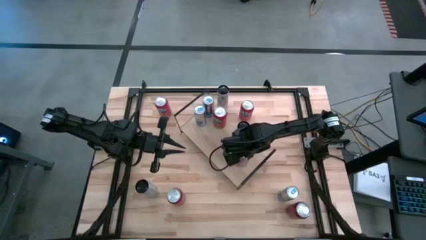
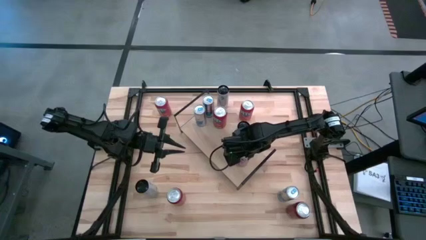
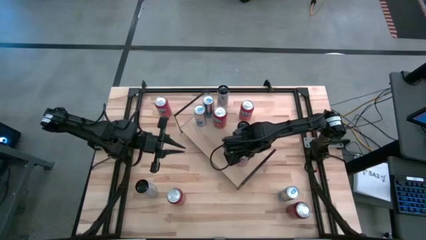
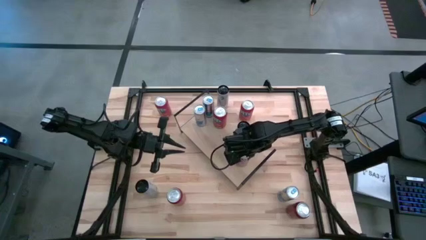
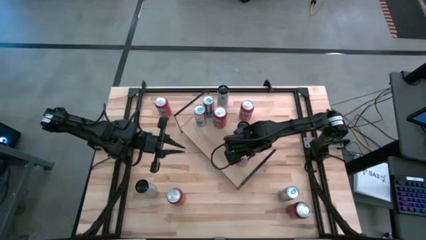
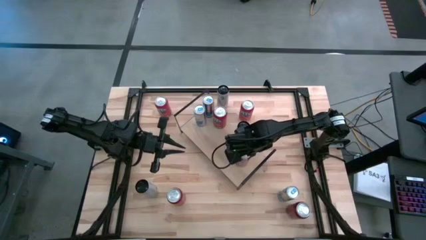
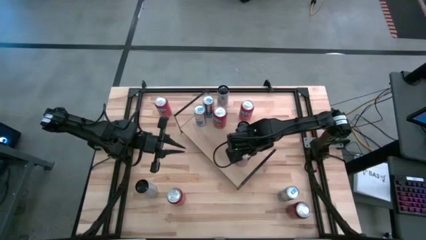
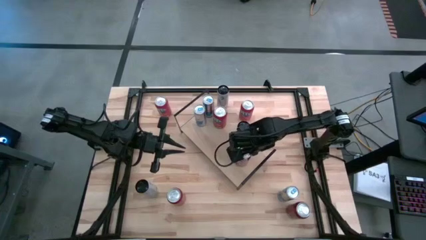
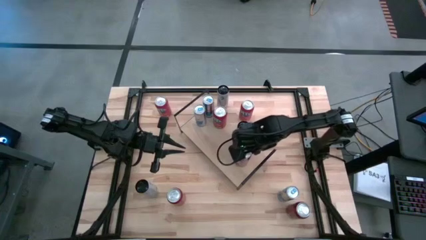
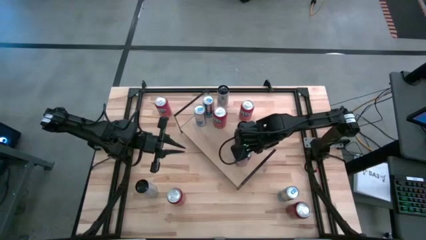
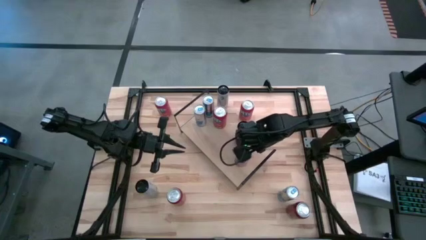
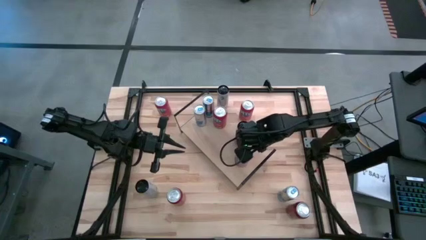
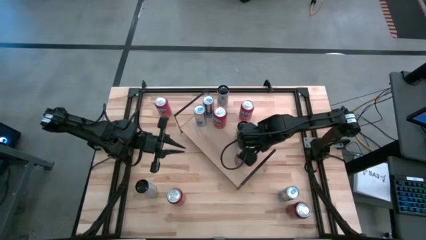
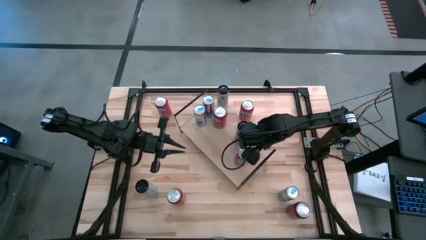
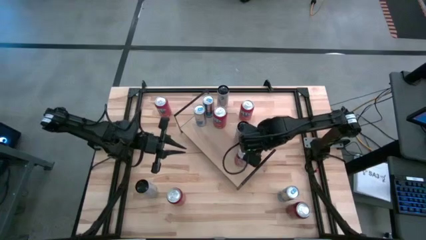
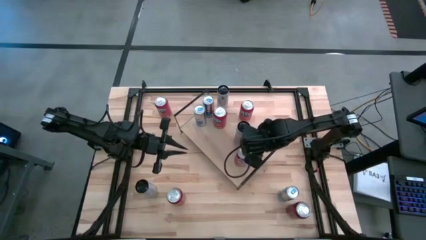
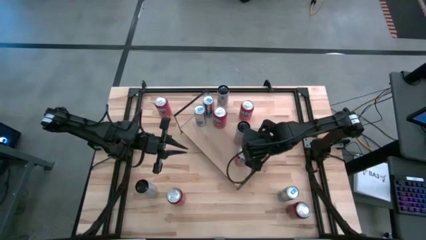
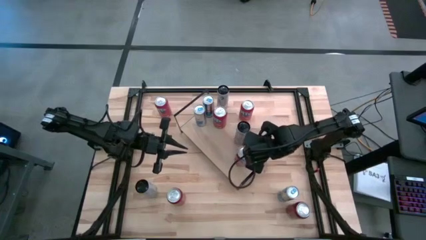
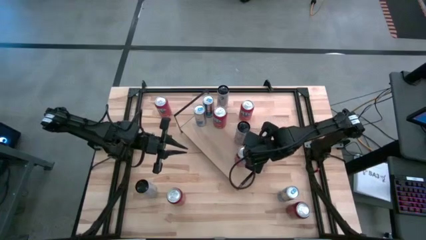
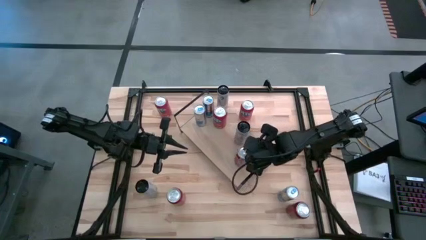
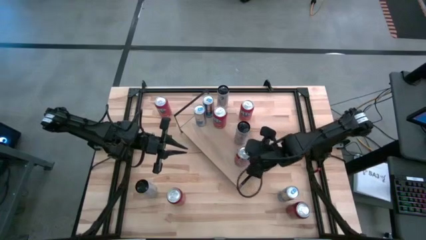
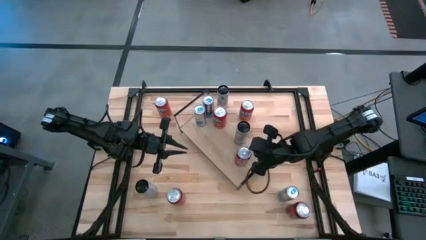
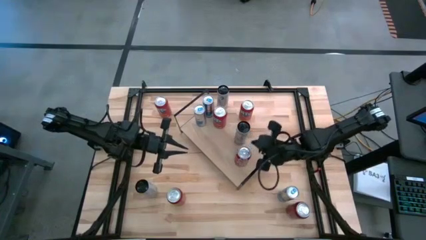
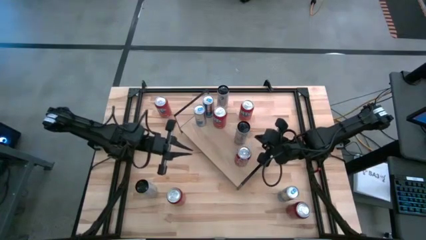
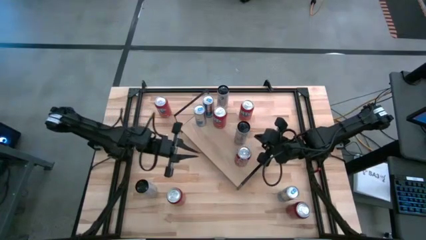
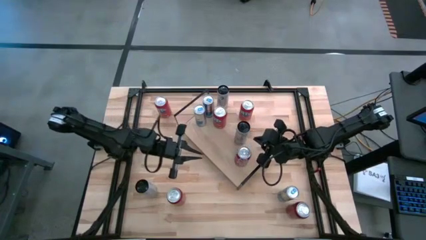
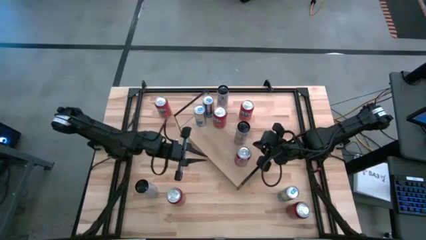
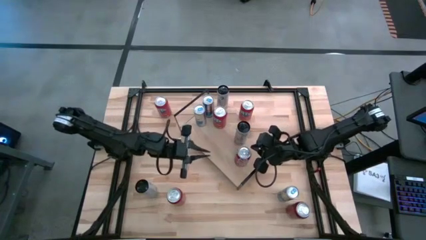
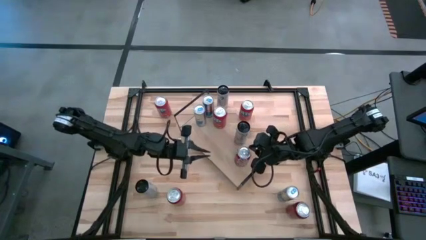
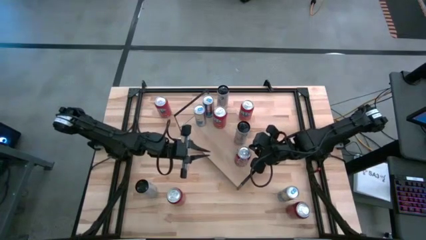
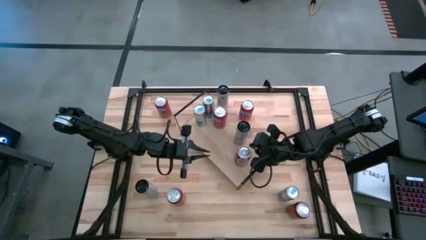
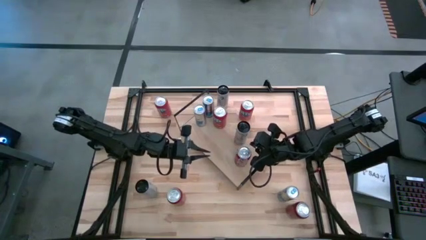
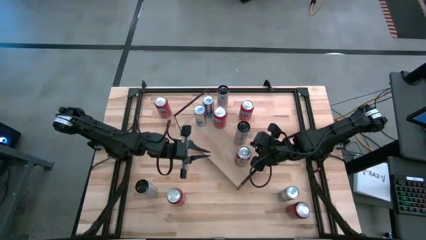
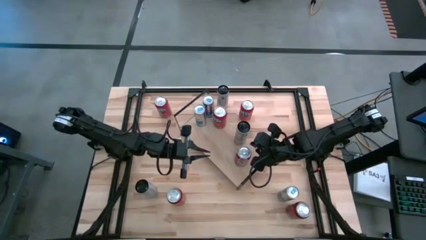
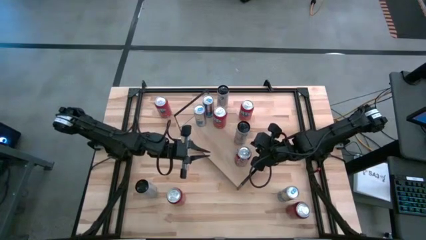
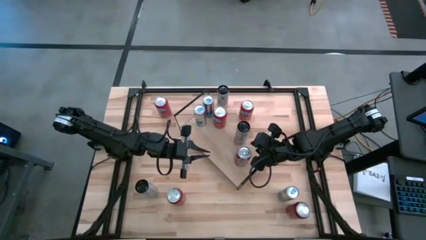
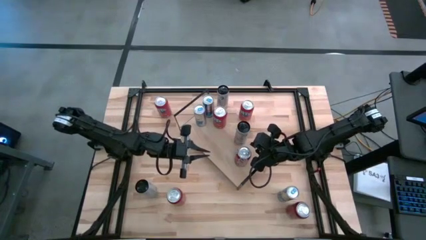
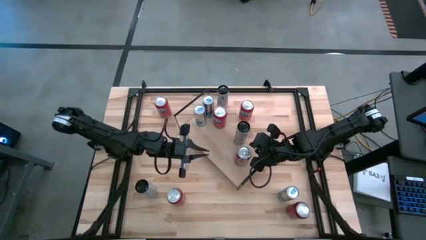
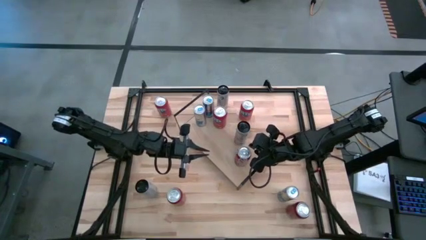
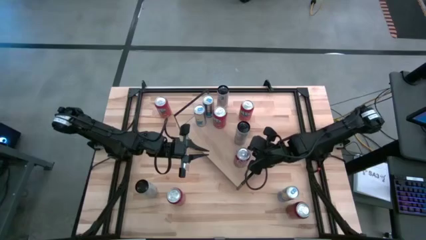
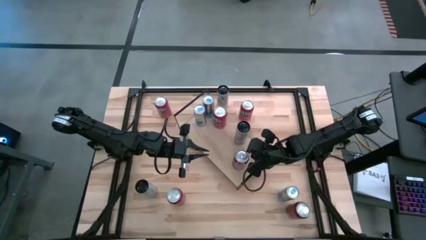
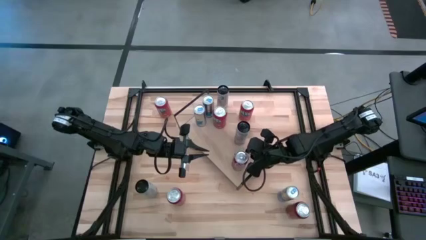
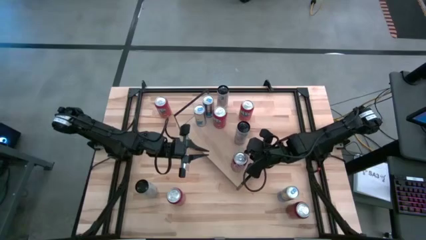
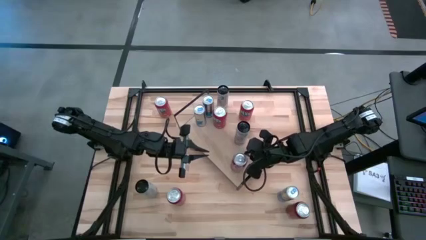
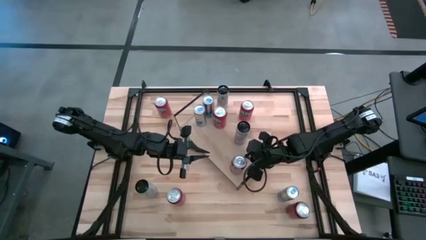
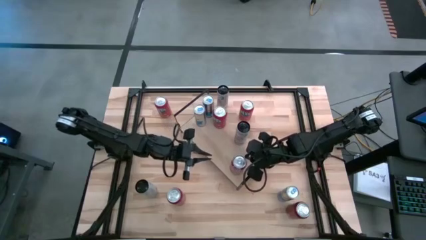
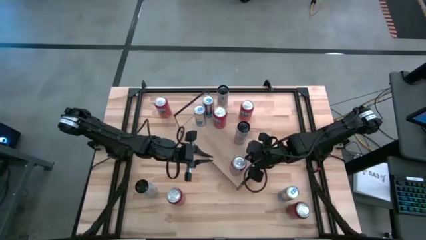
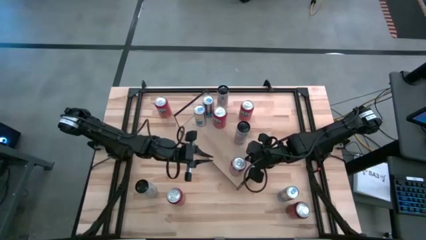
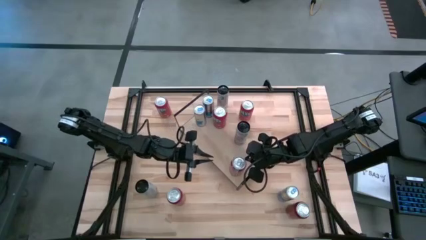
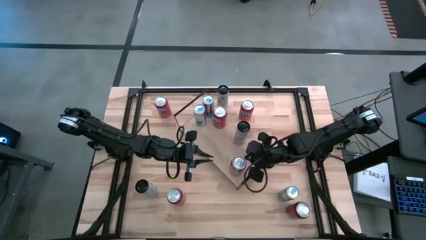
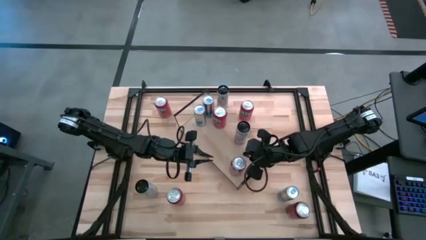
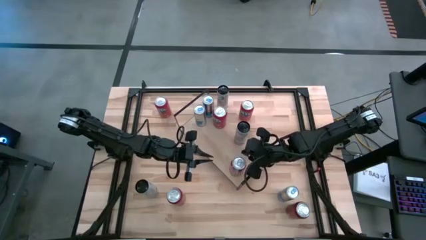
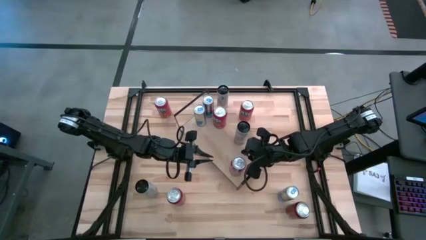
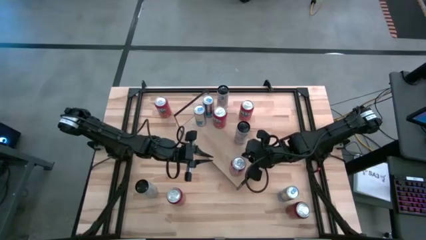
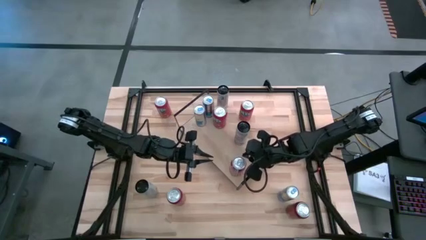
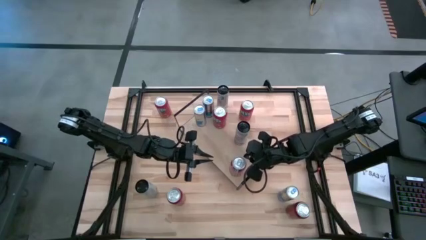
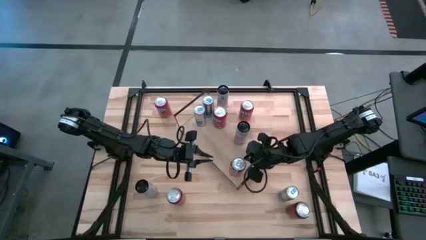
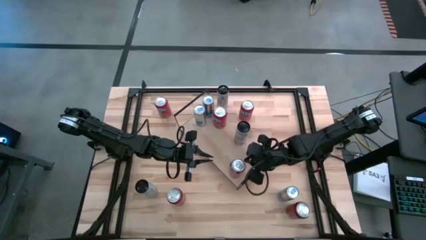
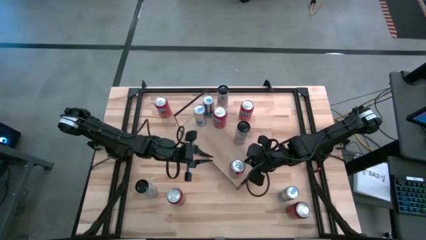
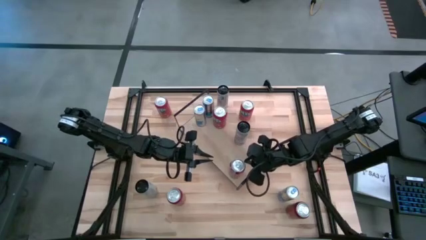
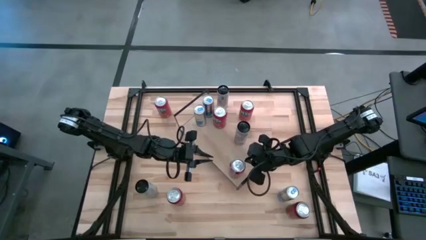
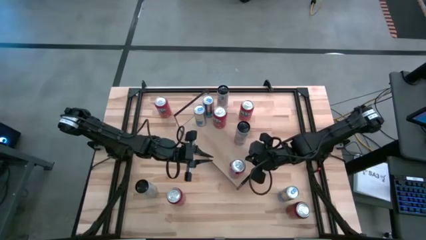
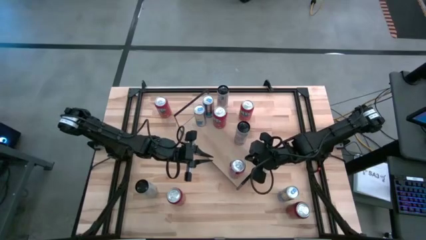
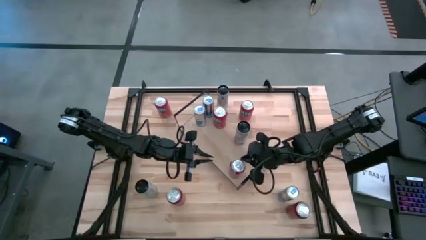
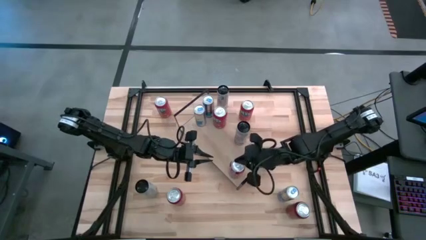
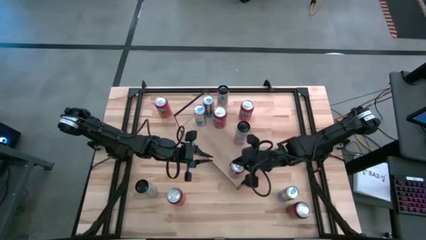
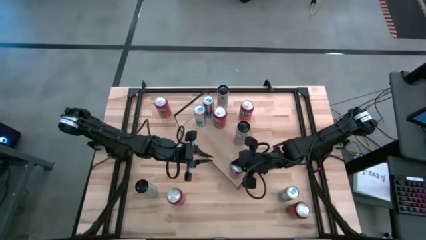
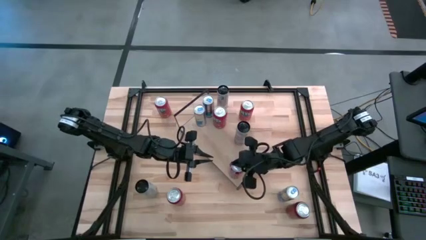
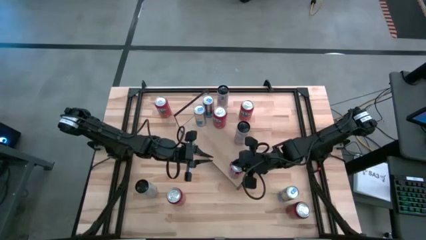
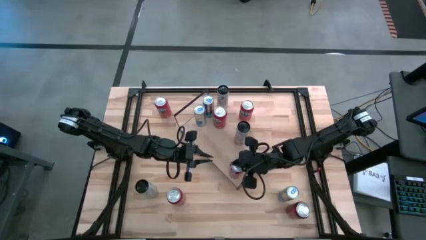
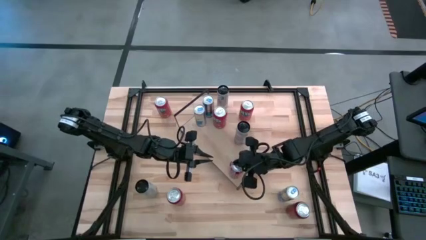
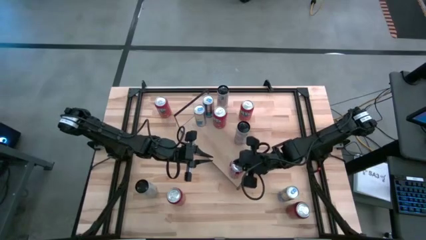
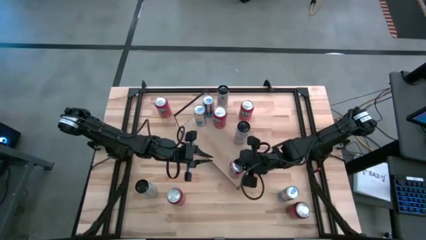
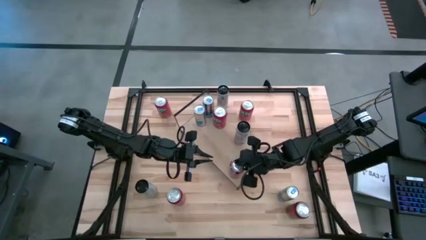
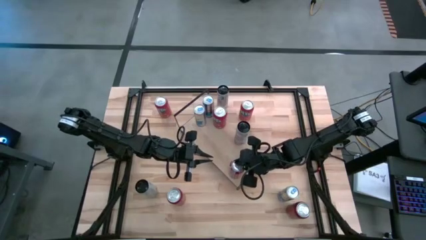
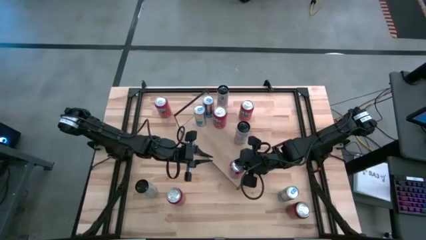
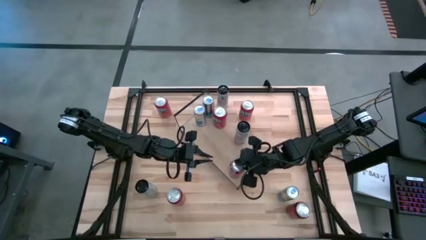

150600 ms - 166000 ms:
Task: Place canned beverage on shelf
Put the red soda can on the shelf
